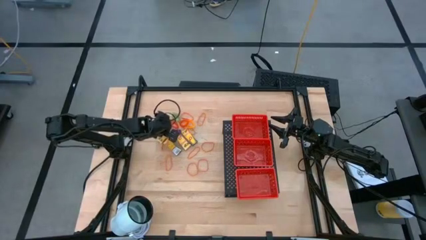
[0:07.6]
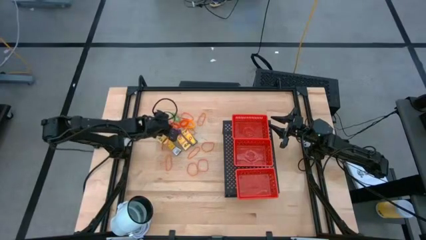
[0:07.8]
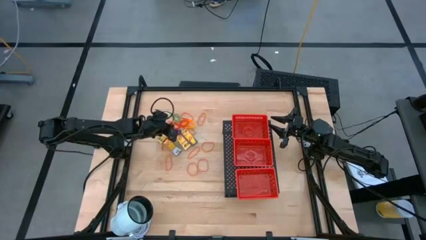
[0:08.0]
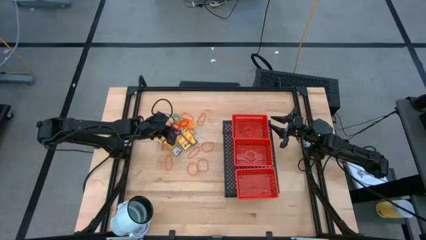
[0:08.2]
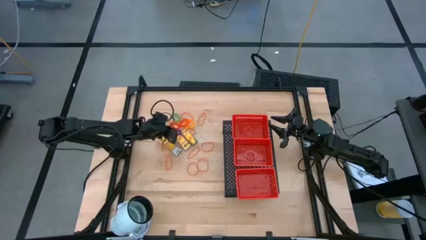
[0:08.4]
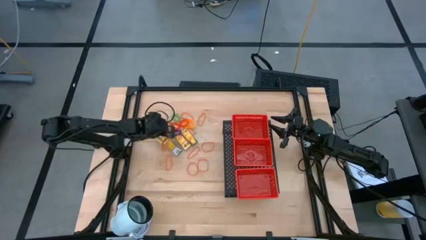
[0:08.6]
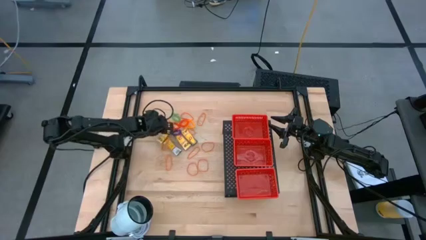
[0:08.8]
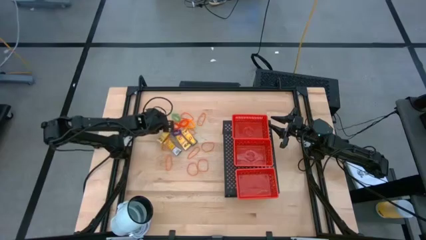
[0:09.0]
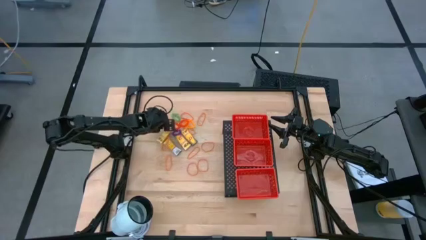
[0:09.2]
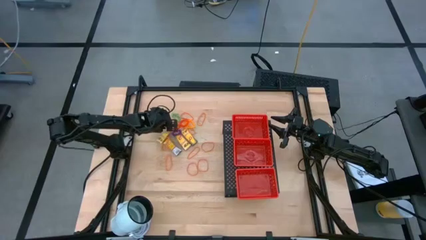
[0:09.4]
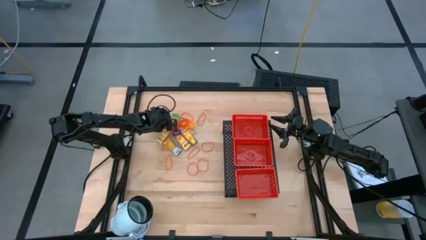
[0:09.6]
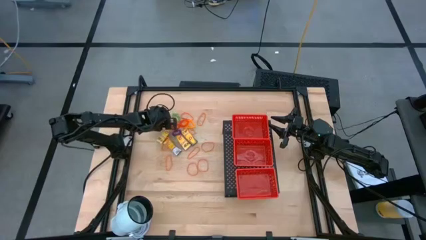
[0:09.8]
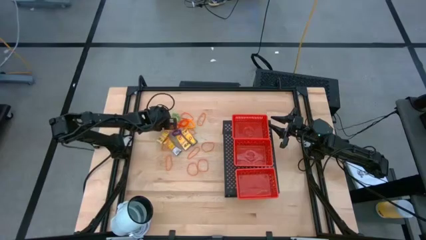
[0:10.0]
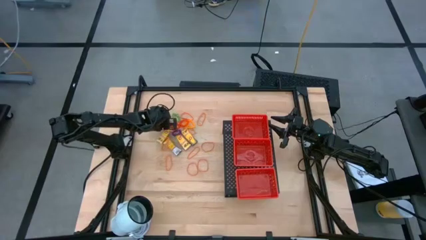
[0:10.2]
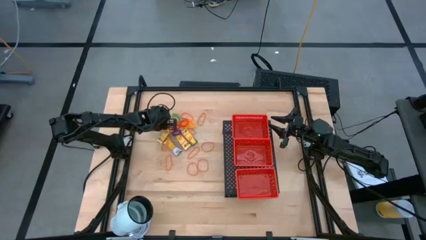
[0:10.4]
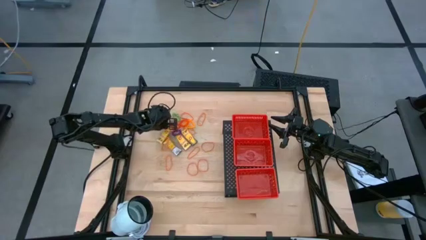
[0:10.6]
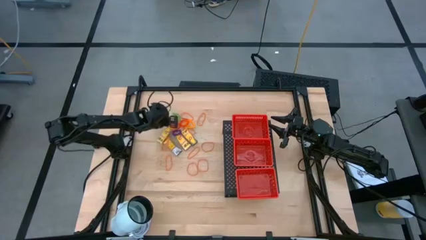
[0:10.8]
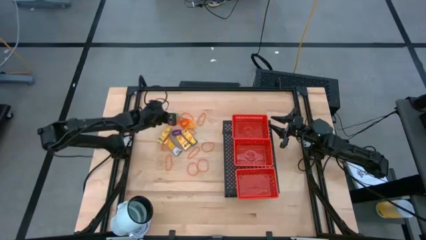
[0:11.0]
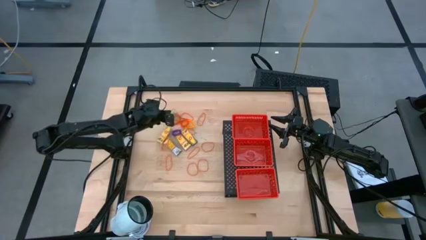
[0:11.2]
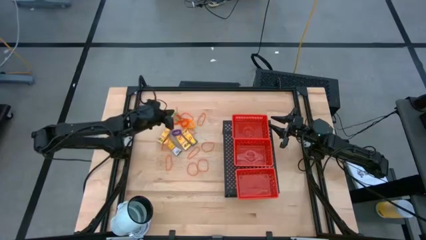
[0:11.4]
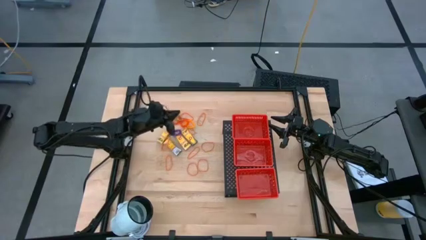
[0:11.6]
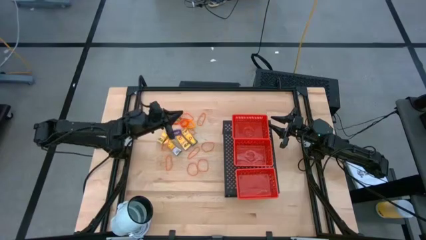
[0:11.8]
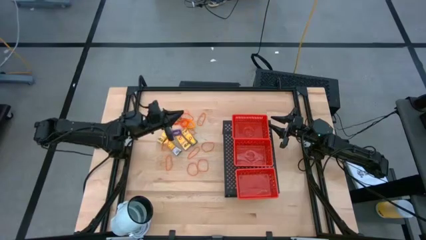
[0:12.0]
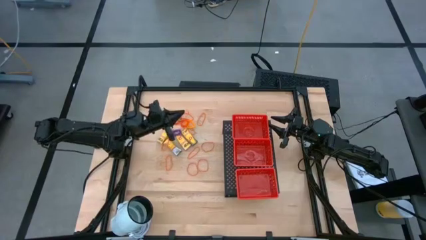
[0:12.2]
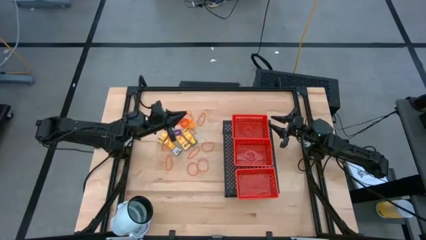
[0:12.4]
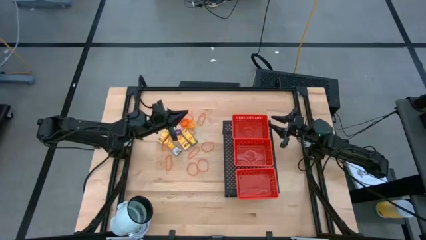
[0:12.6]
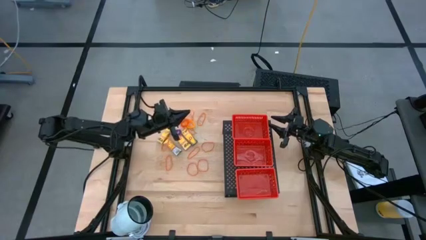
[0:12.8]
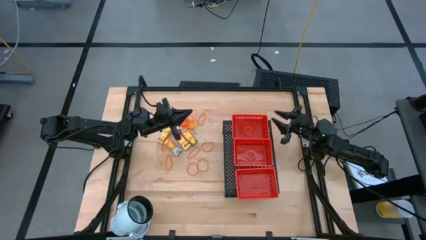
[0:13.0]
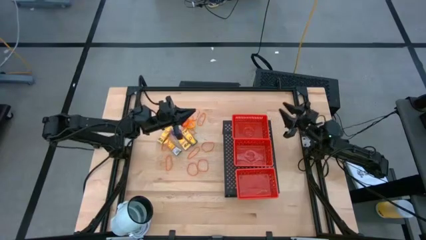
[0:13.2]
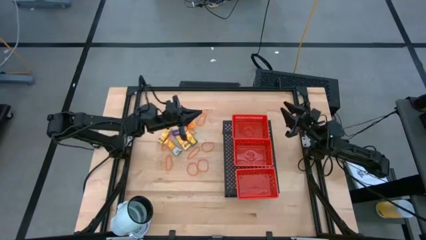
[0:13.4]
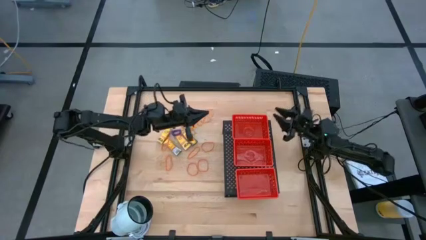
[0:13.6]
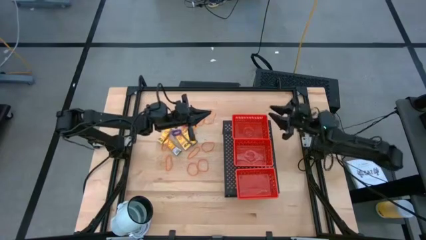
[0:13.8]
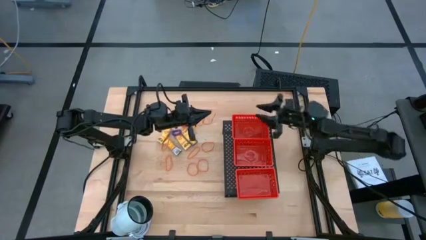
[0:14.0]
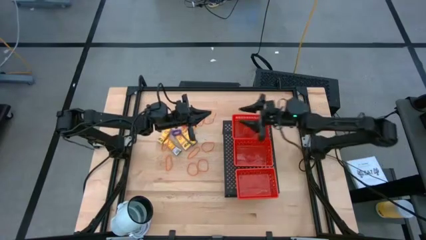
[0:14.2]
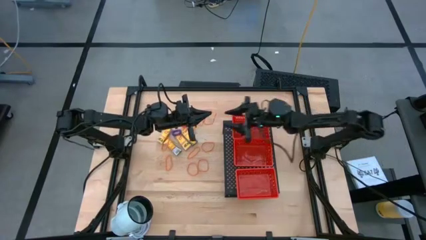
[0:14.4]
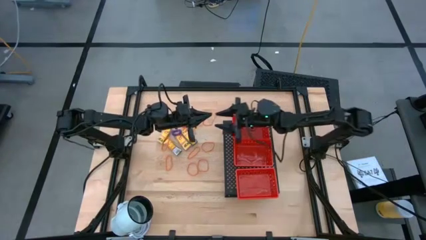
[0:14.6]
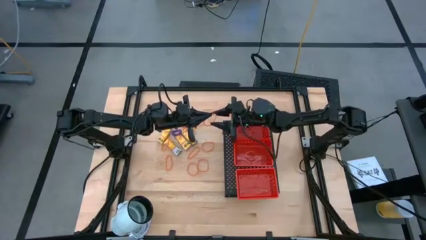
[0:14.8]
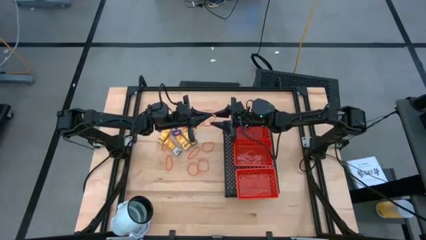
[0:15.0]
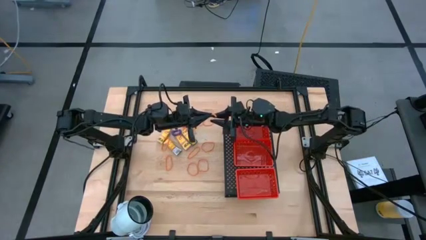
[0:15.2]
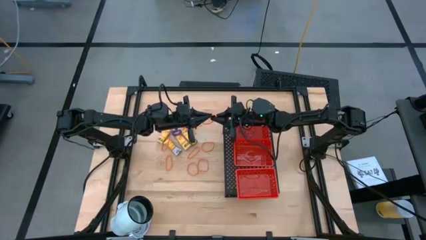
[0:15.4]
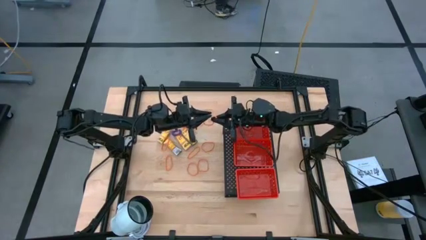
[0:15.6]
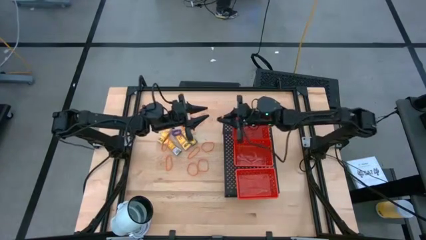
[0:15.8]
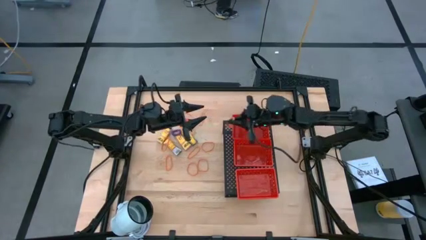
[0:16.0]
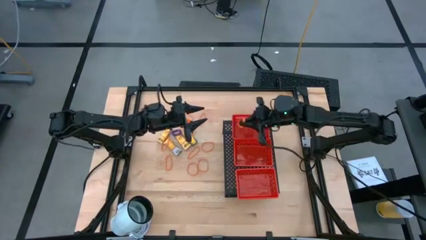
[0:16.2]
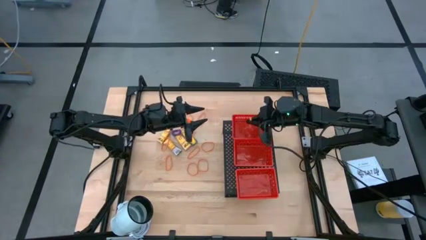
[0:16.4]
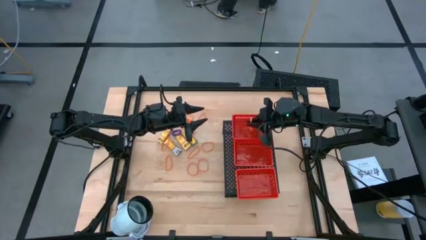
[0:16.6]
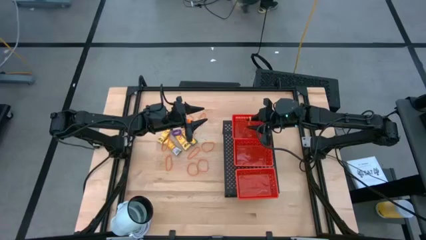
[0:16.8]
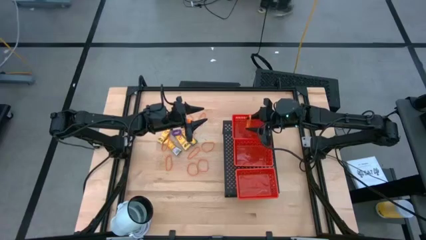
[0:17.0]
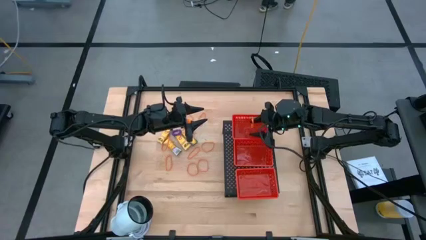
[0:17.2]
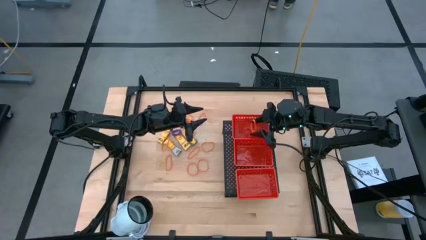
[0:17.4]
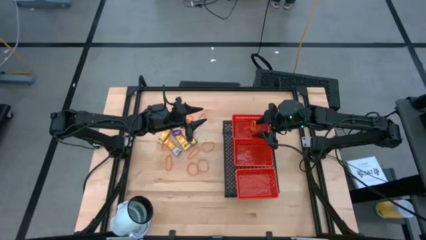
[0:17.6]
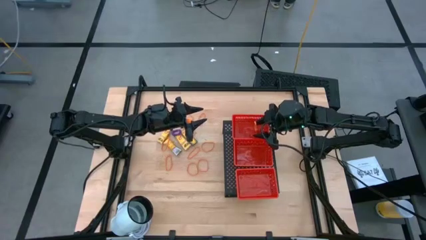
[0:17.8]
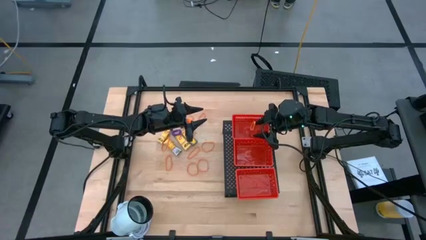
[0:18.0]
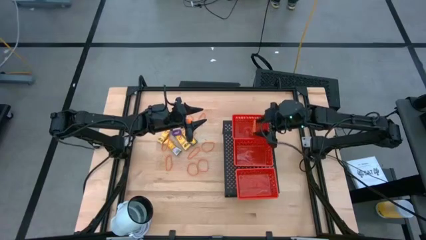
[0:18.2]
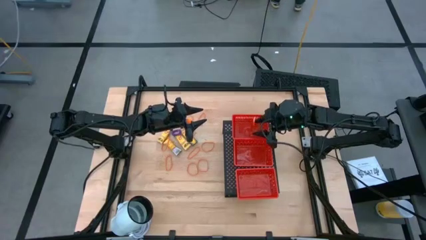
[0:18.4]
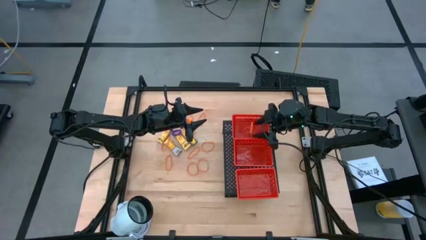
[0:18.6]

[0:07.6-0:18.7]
Task: Pick & Place Office Desk Supplies
Put the orange rubber band into the top red bin on the shelf

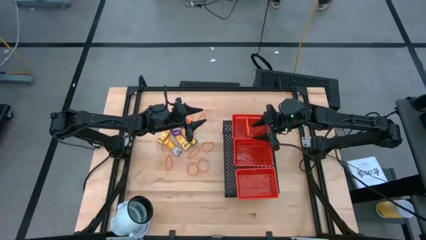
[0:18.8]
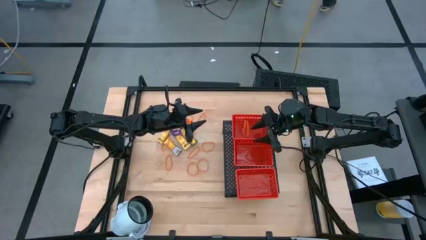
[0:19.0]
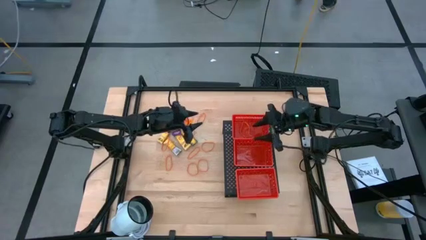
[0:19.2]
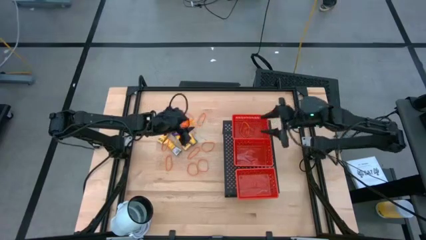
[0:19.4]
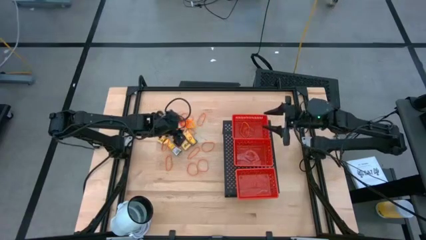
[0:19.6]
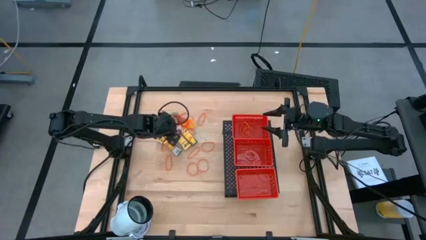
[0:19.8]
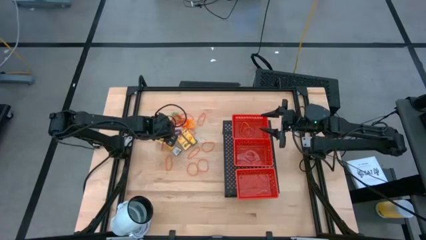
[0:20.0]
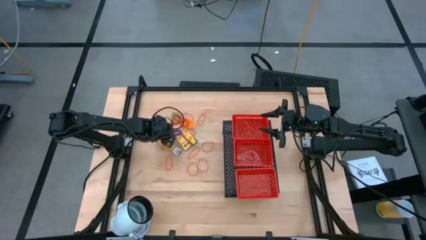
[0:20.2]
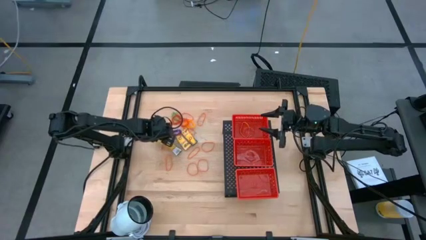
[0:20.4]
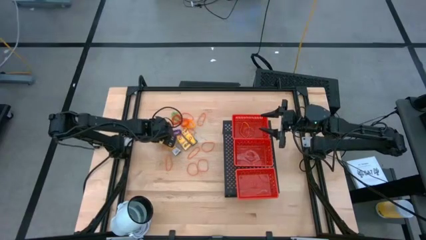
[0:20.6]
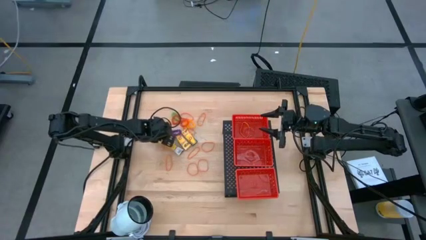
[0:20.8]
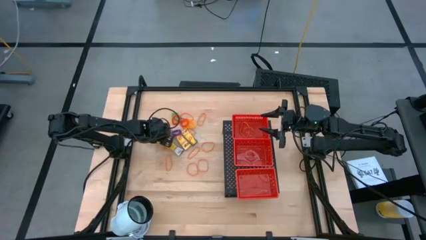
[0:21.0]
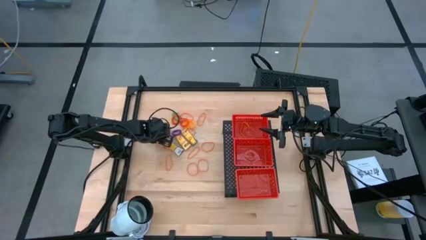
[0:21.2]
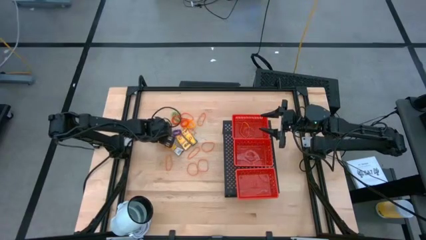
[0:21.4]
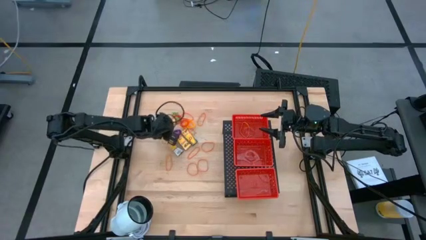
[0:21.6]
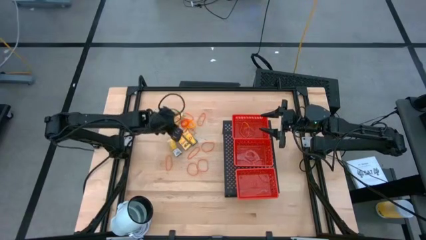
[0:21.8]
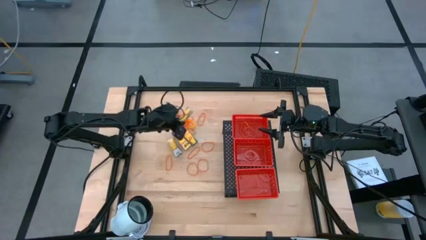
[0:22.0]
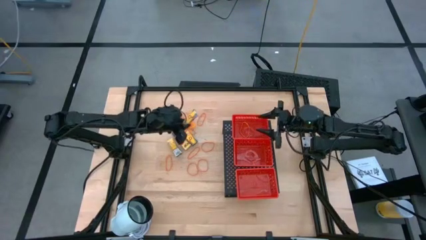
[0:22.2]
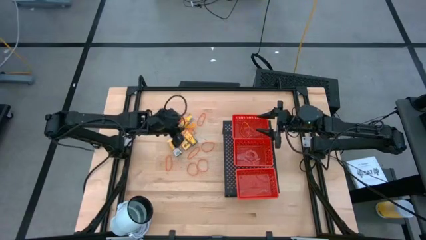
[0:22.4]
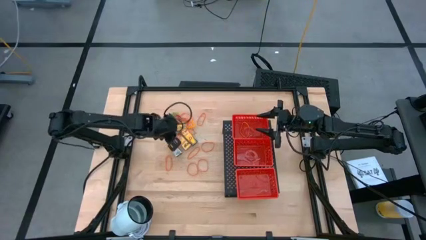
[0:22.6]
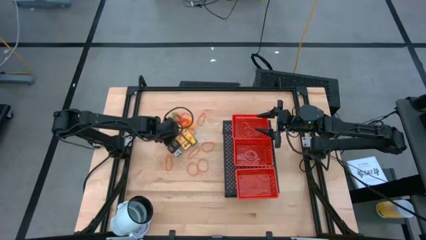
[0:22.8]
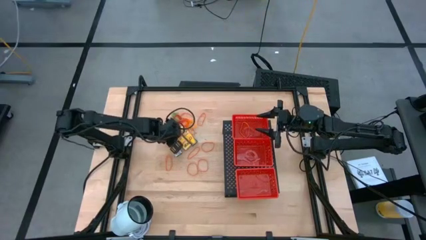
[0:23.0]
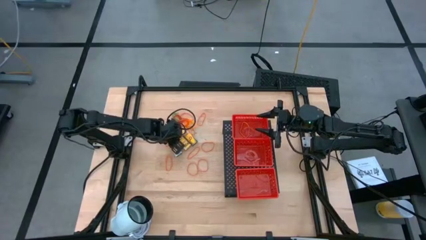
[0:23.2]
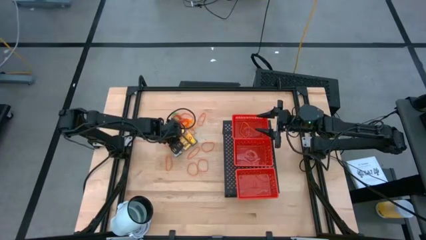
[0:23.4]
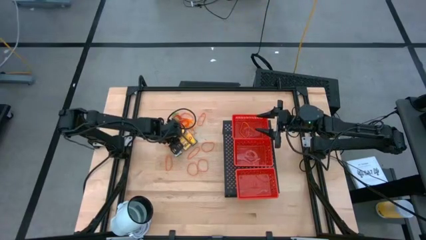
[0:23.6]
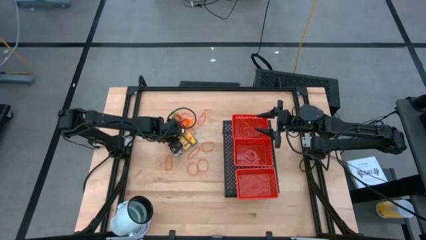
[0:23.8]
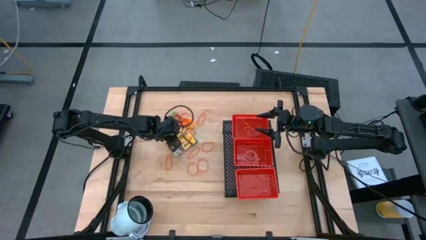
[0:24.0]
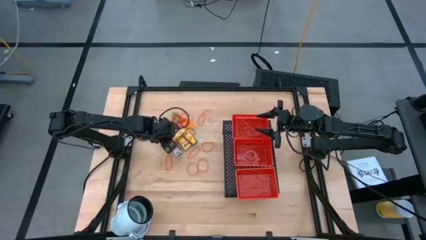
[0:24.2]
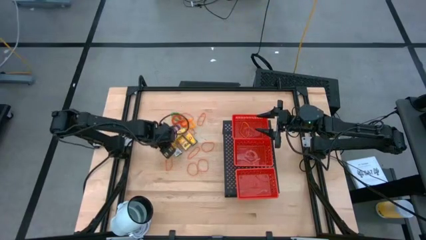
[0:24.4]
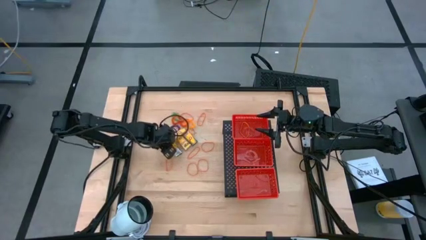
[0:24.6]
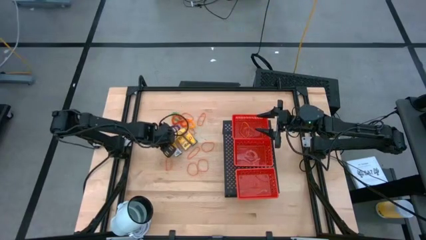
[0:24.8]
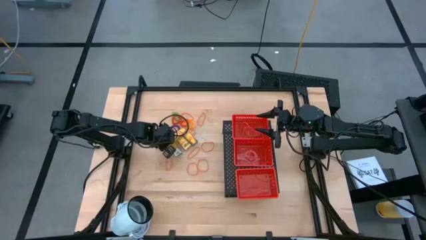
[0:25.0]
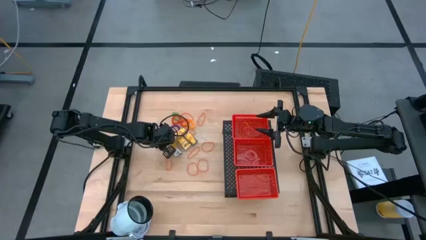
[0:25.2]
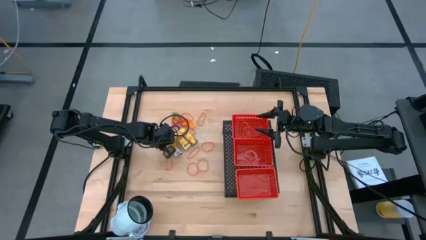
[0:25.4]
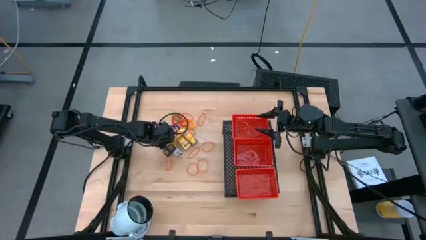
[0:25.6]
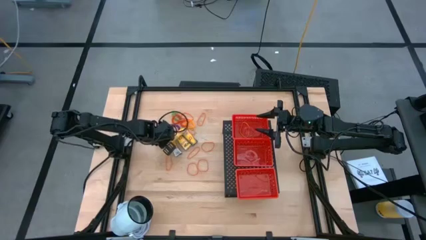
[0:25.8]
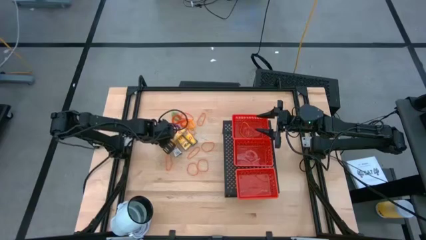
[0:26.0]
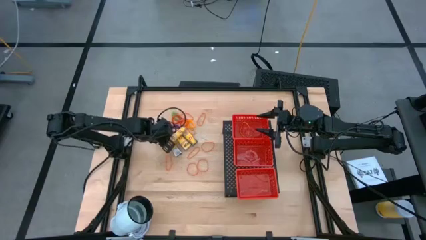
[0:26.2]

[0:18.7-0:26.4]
Put the orange rubber band into the top red bin on the shelf
